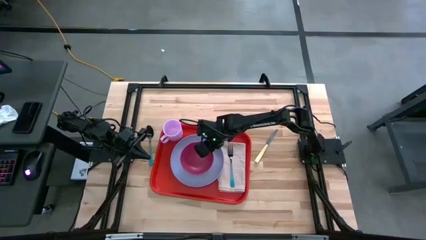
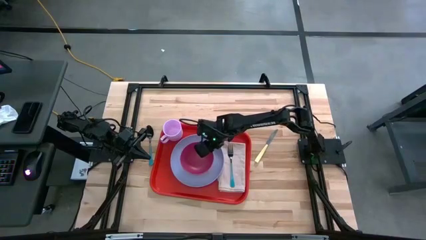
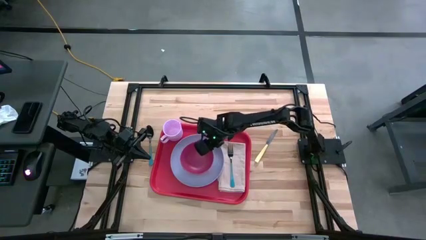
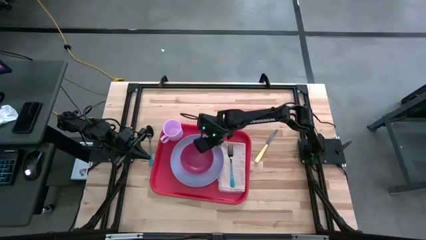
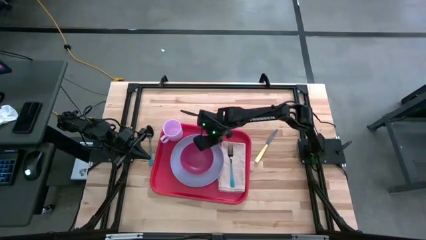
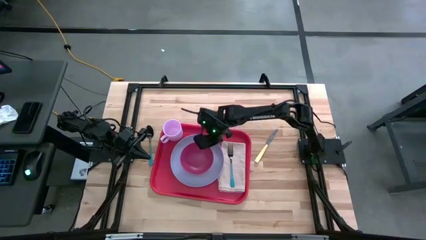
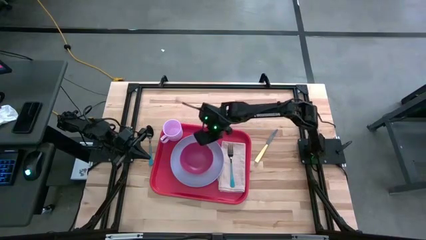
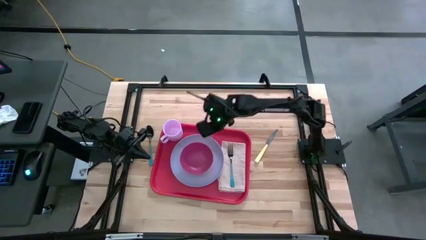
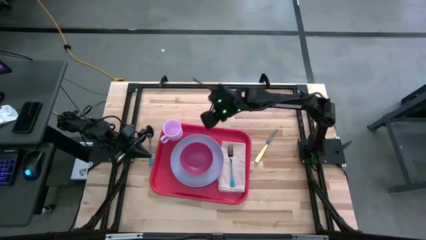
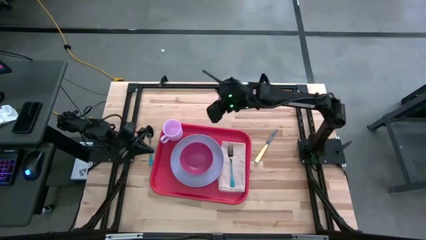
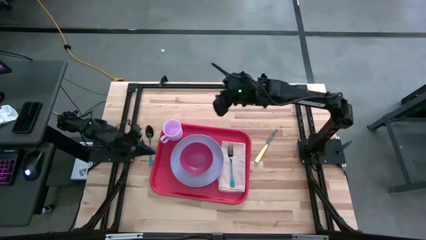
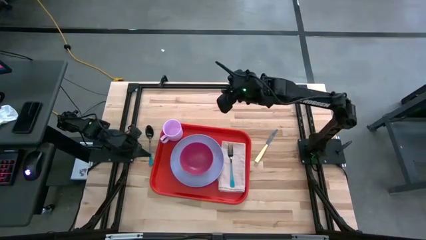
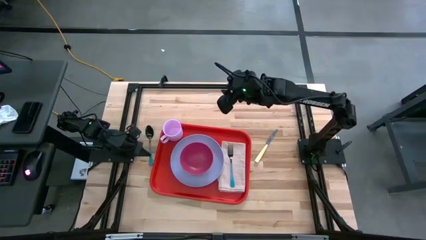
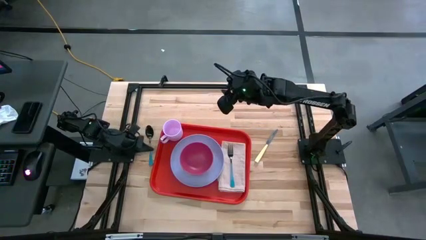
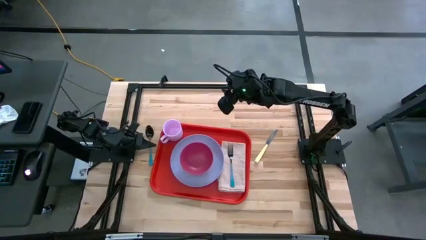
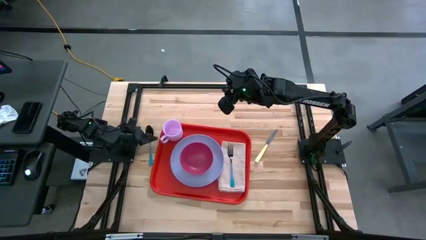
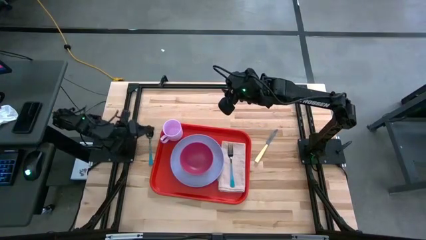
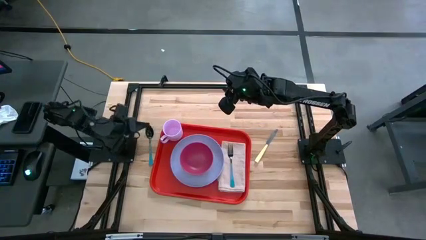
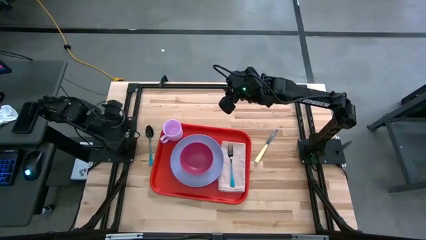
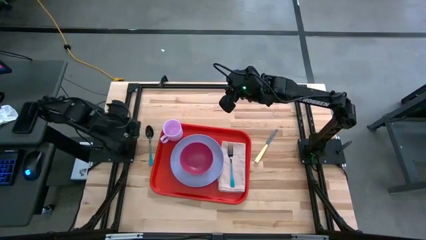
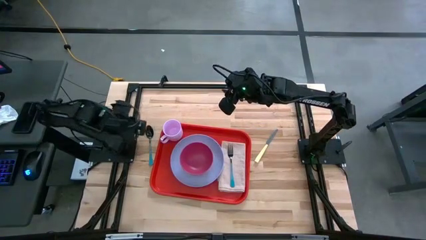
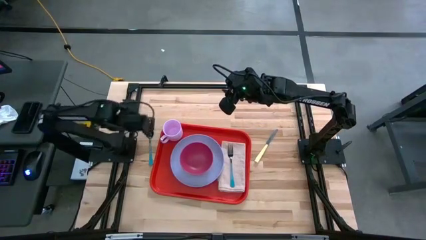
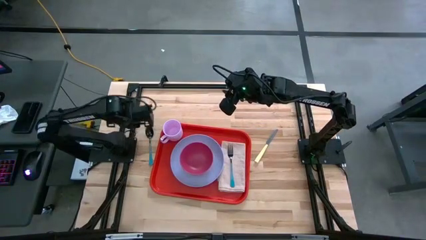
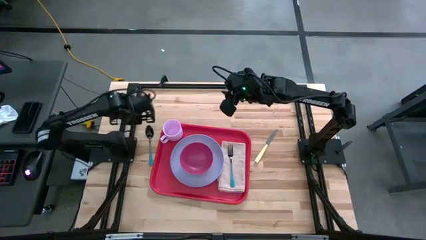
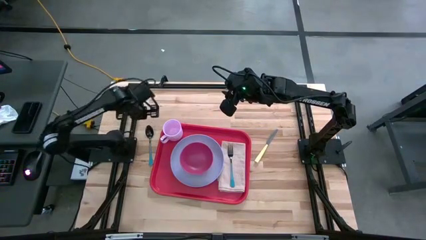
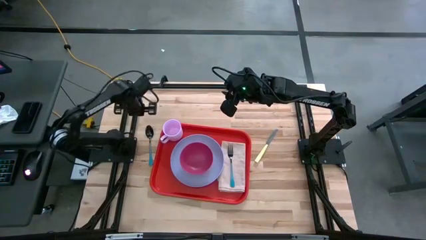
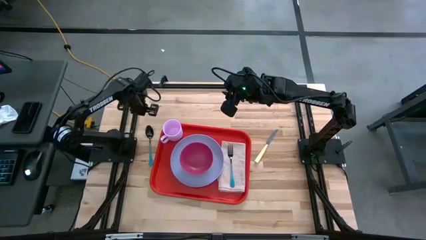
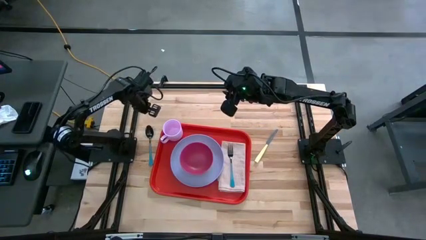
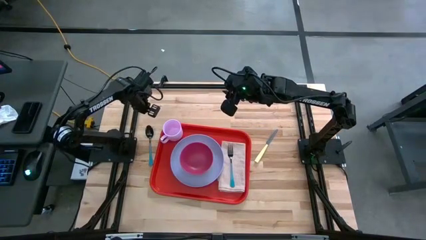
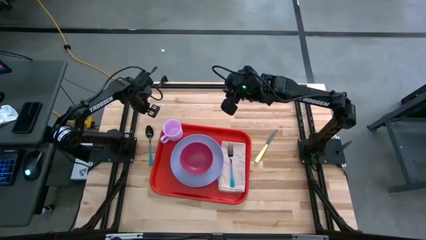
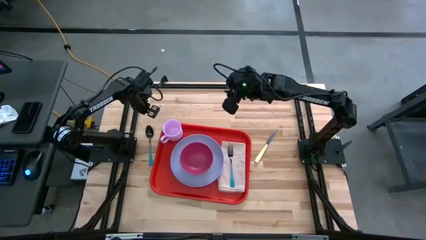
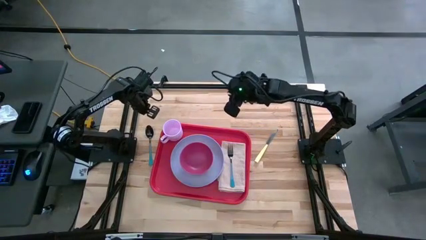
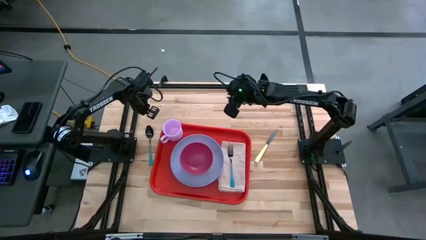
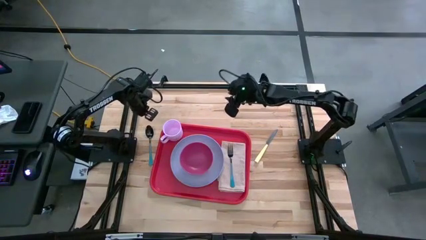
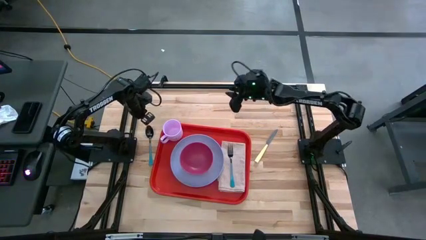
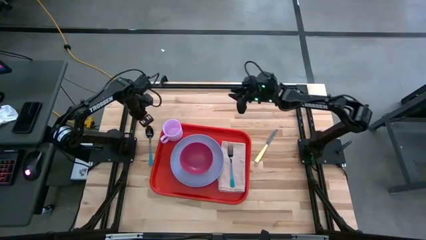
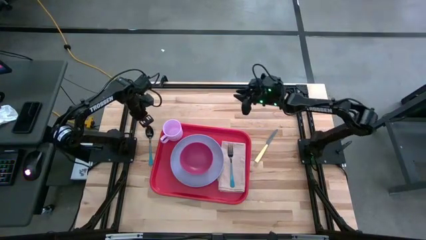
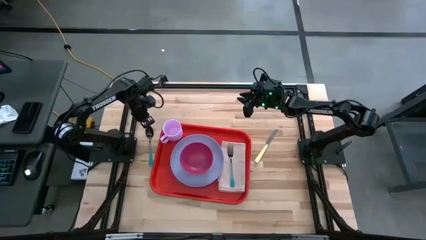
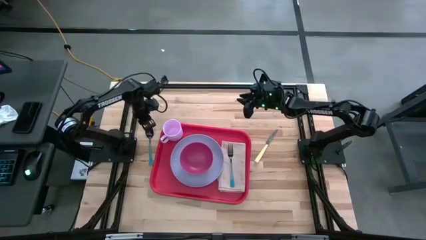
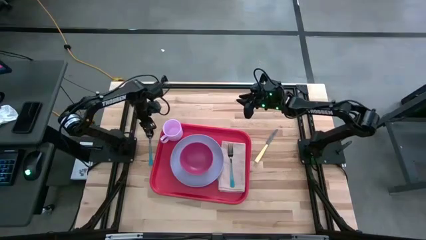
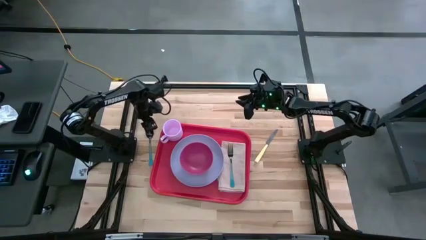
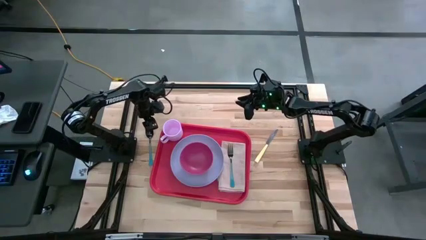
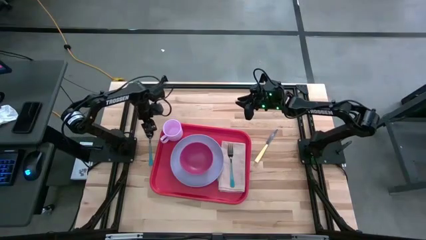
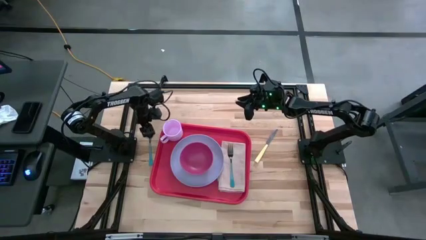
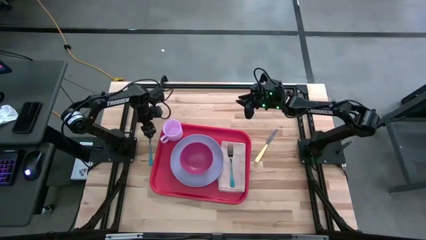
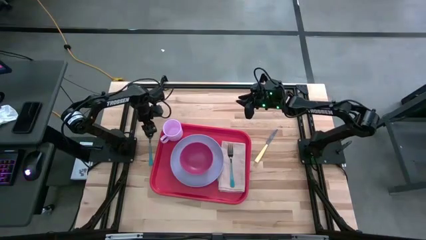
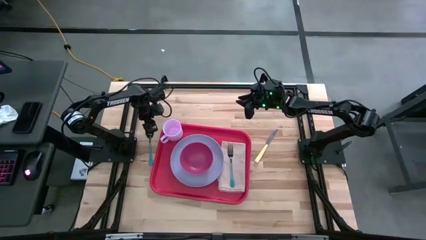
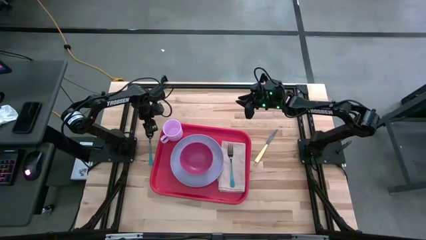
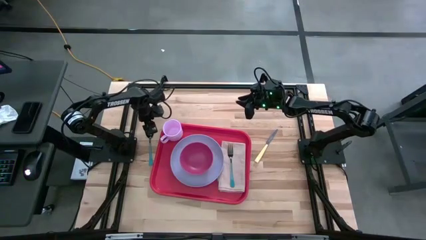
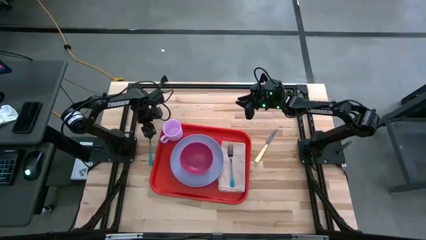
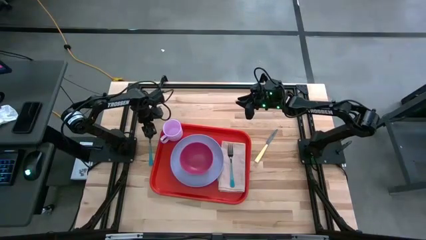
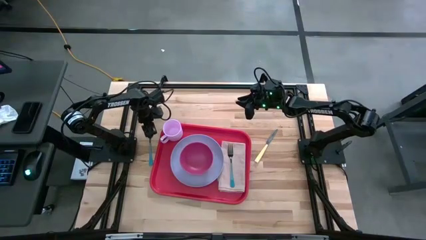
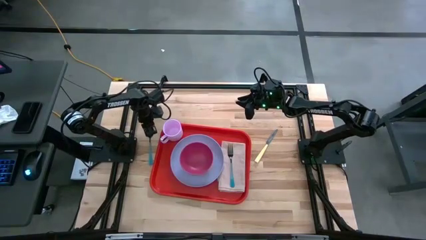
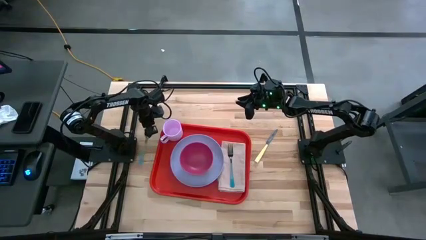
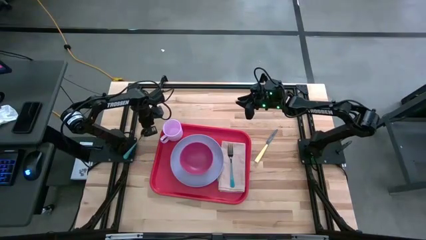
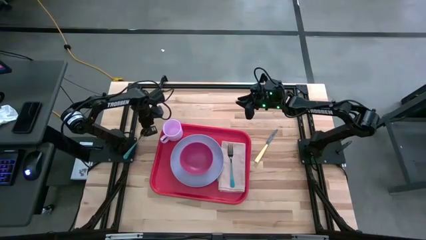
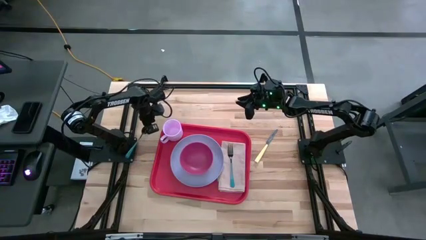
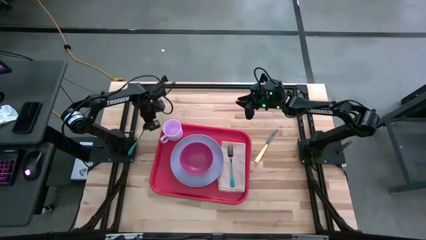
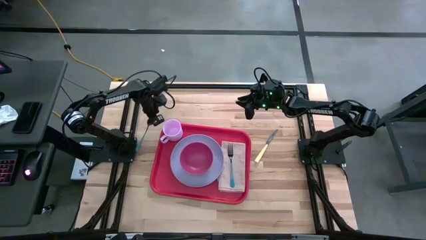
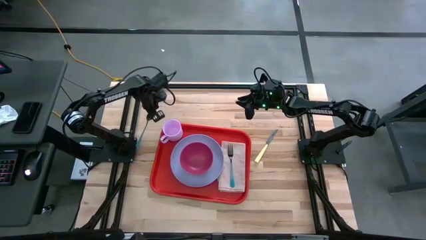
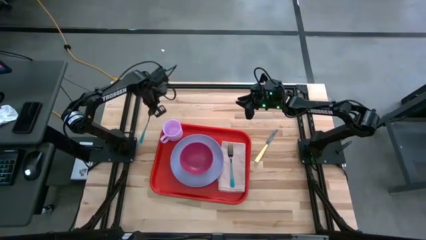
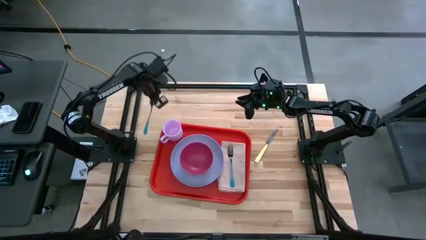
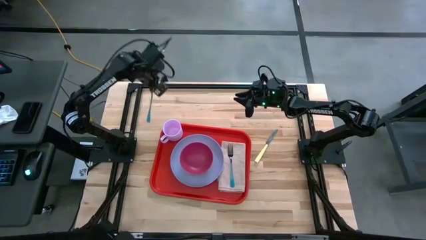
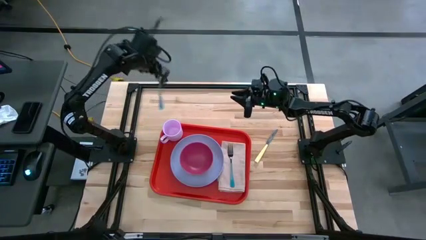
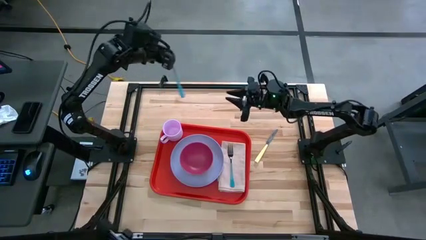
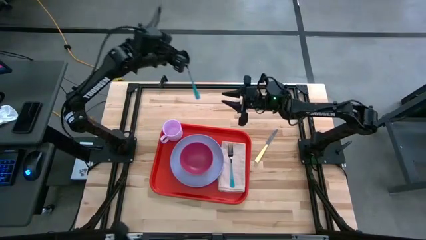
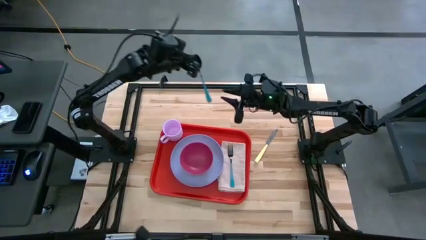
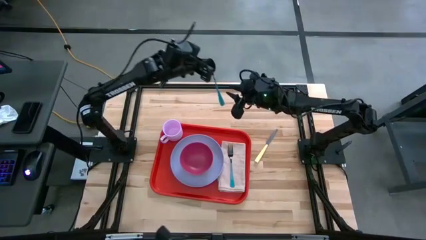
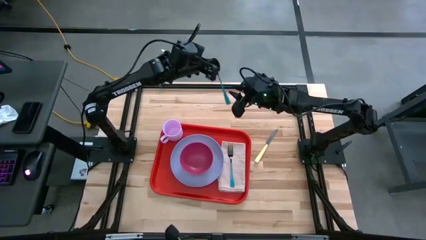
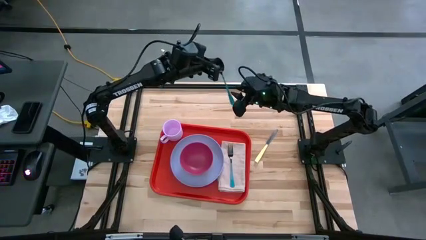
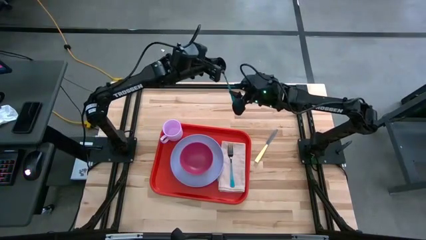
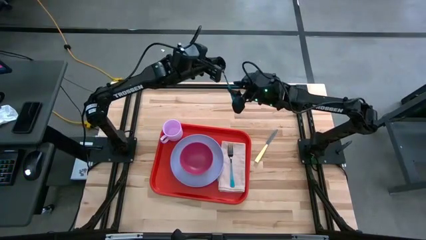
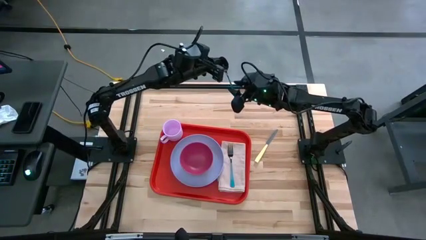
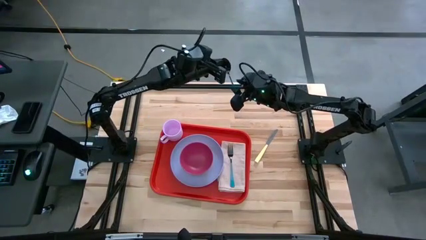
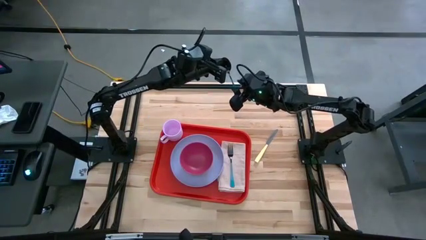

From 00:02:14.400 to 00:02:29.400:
Task: Set up tray
Put the blue spoon on top of the gray napkin to the left of the blue fork

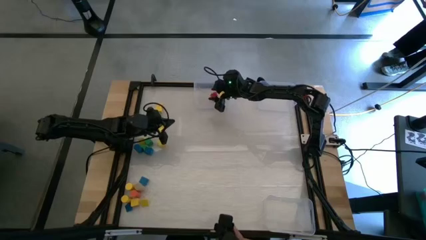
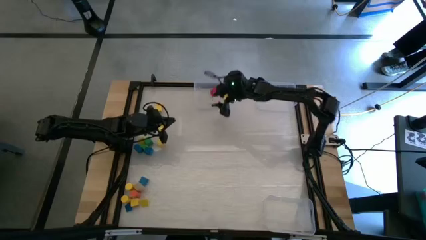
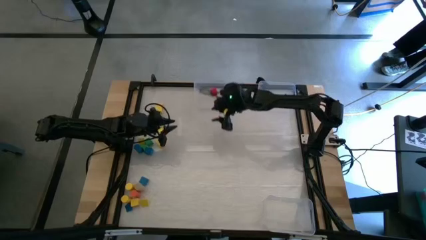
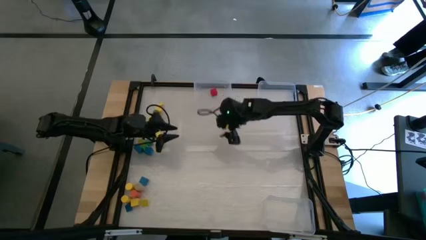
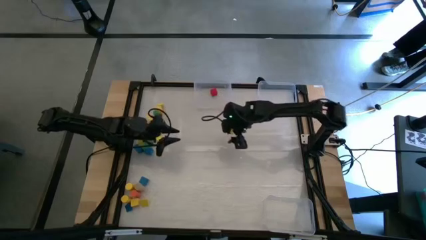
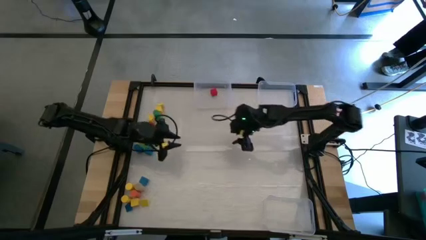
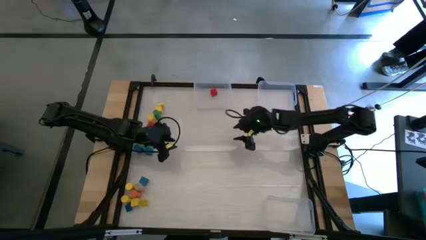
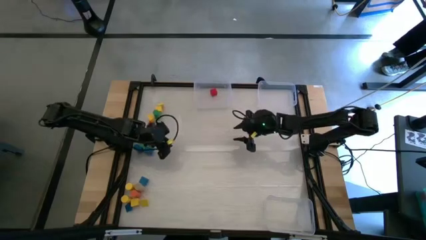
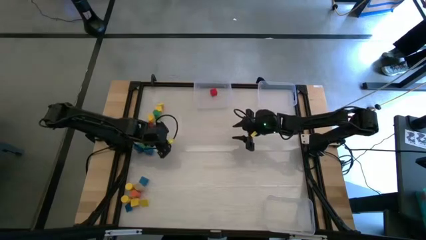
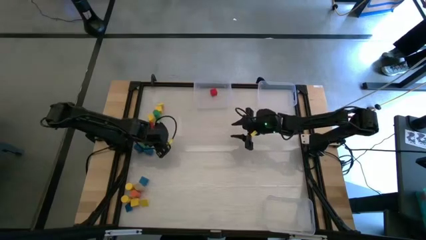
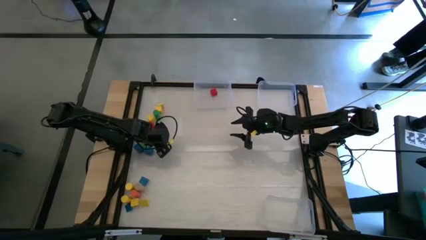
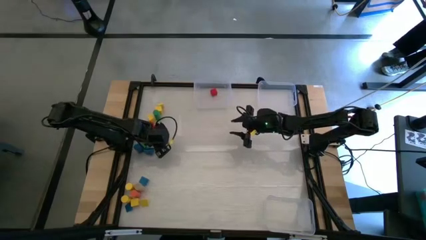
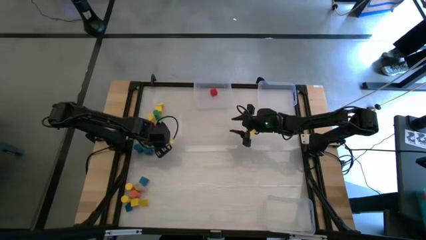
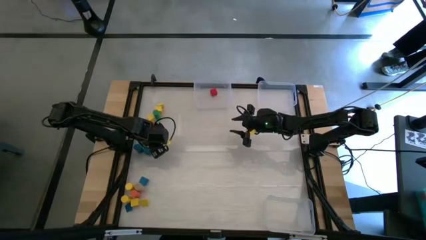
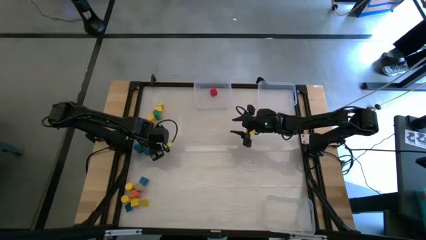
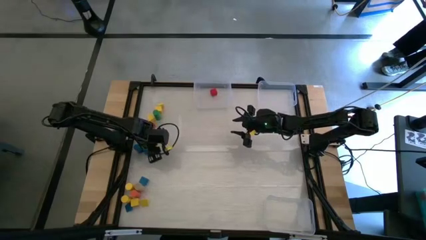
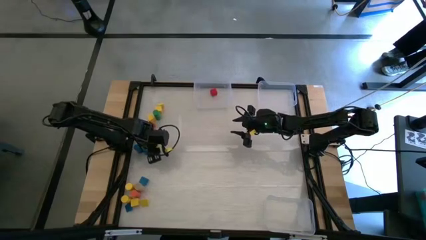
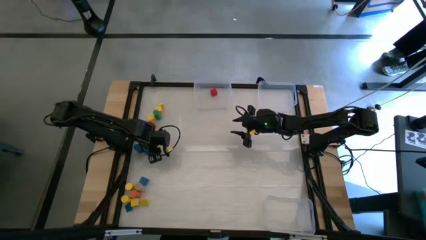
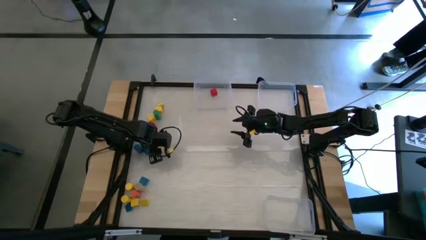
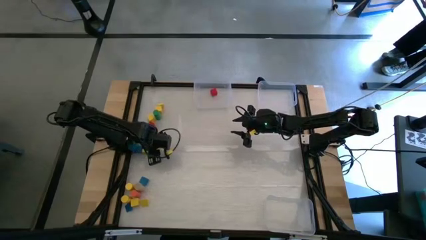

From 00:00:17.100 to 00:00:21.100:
Task: Sort blocks by size
Put the square yellow block into the top left transparent bin
